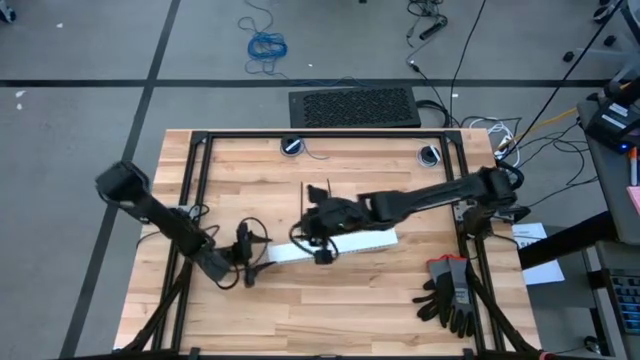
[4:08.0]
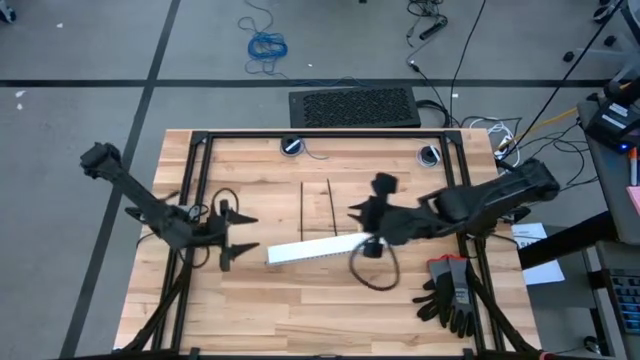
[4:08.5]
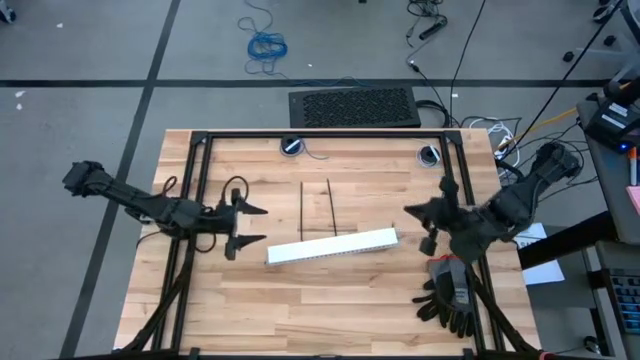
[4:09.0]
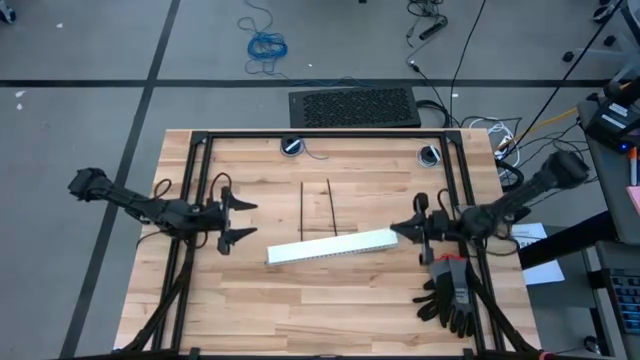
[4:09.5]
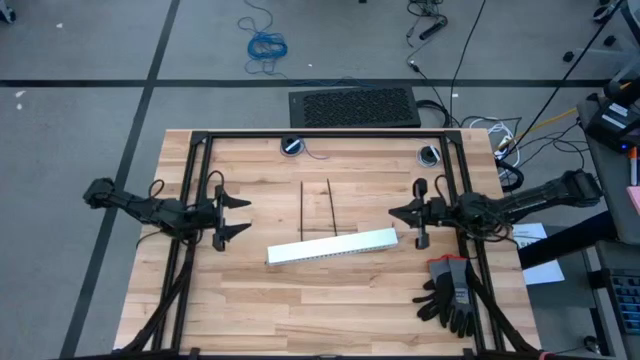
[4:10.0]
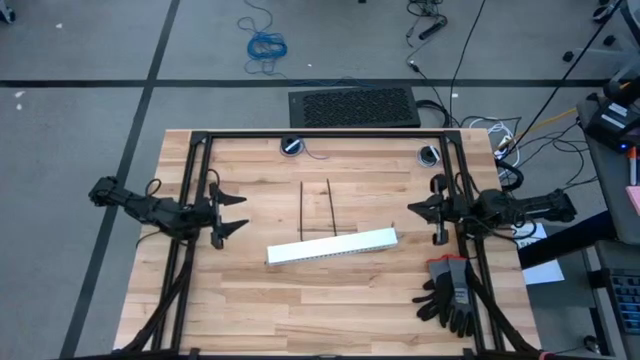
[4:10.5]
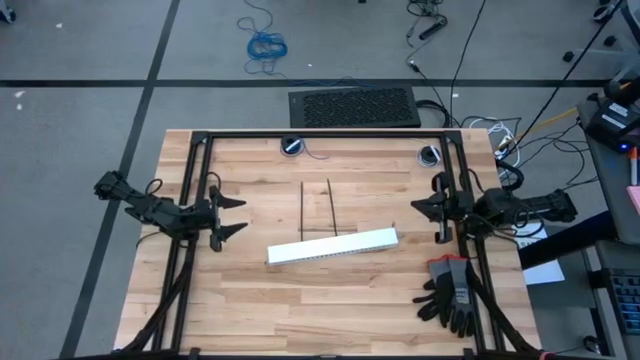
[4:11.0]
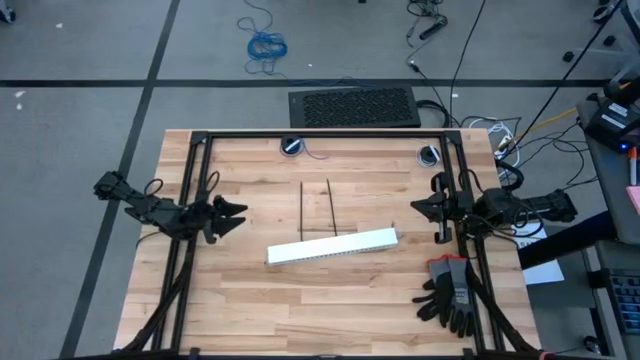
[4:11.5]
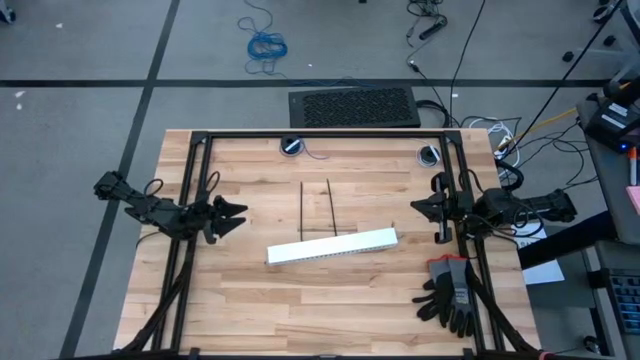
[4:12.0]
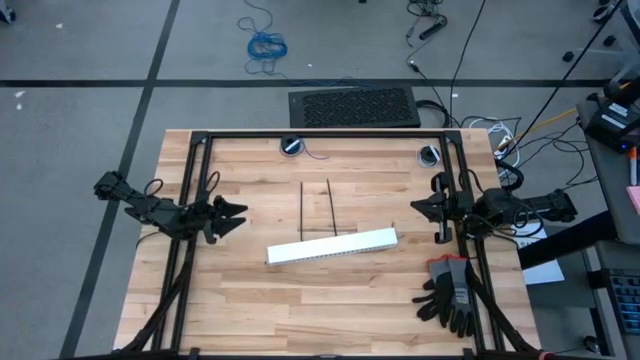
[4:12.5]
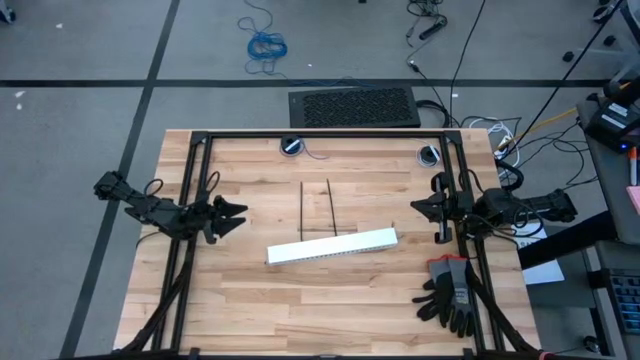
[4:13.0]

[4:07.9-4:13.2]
Task: Ziptie cables
Return to Home Position

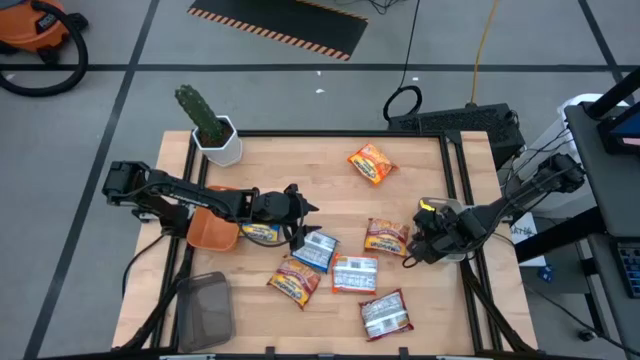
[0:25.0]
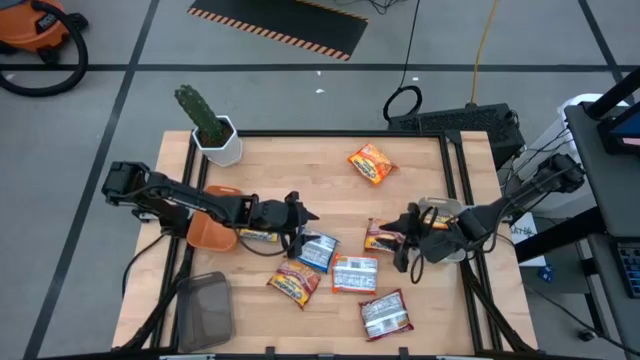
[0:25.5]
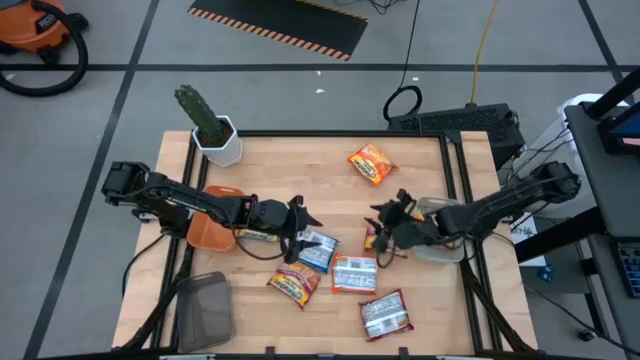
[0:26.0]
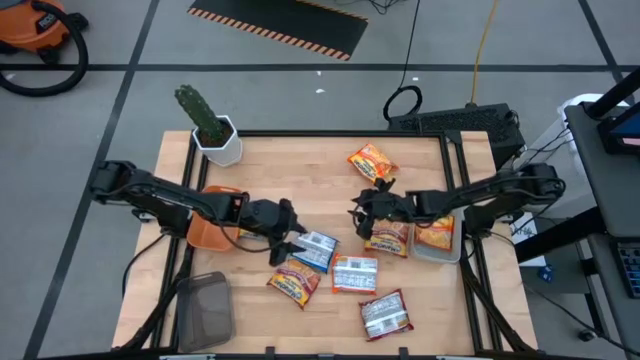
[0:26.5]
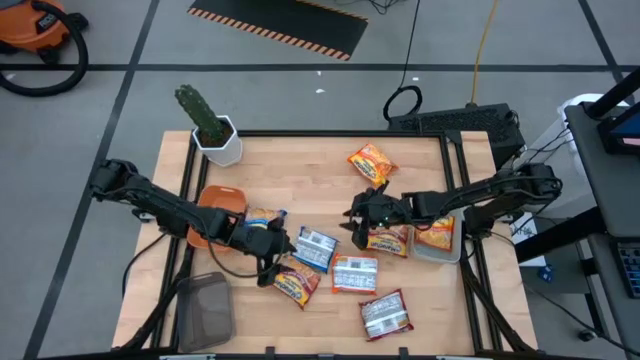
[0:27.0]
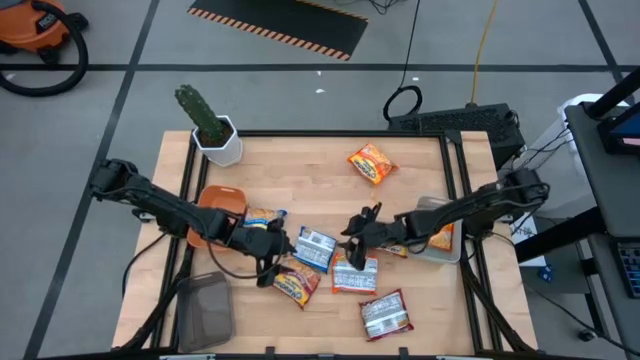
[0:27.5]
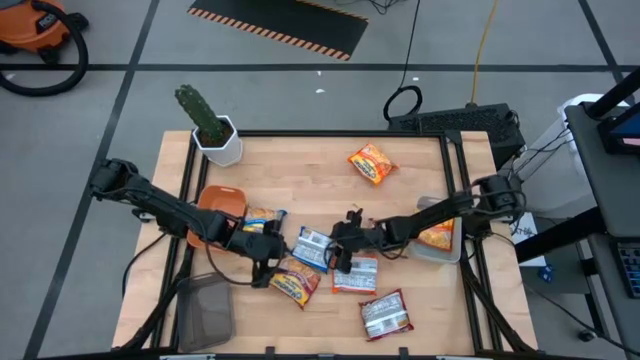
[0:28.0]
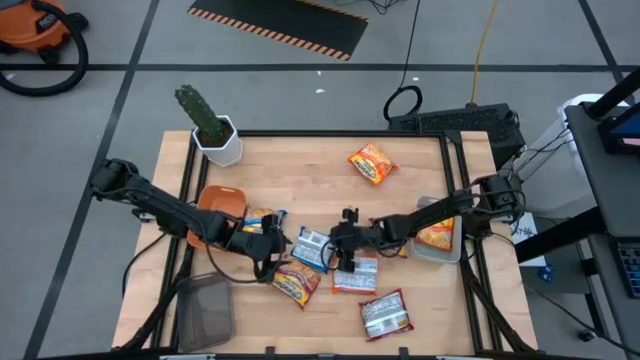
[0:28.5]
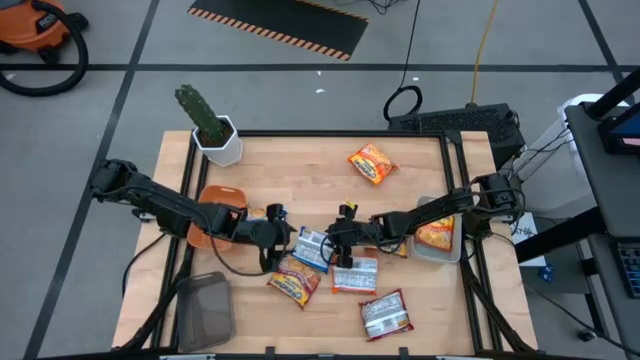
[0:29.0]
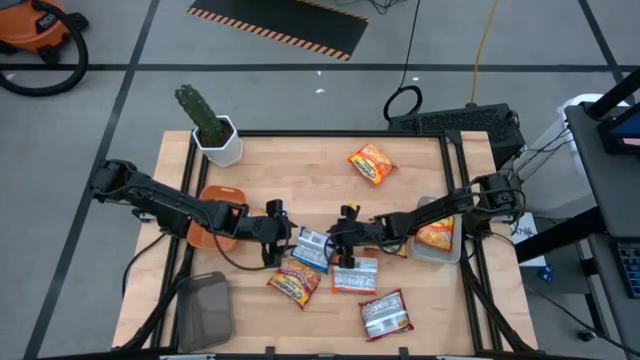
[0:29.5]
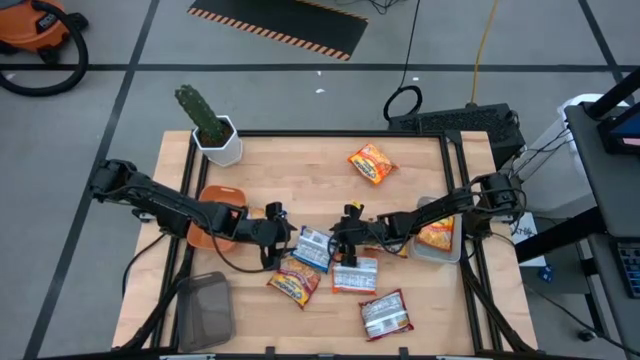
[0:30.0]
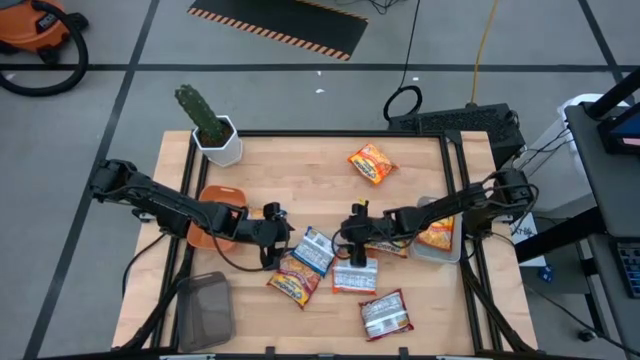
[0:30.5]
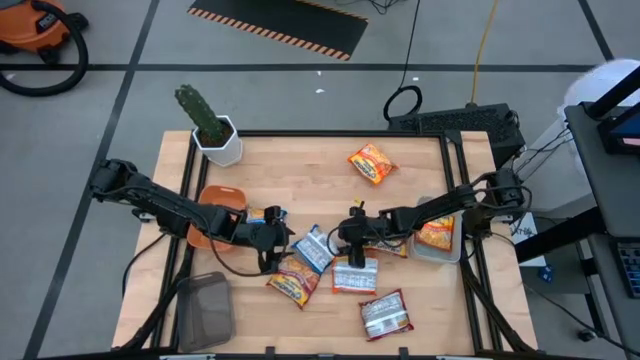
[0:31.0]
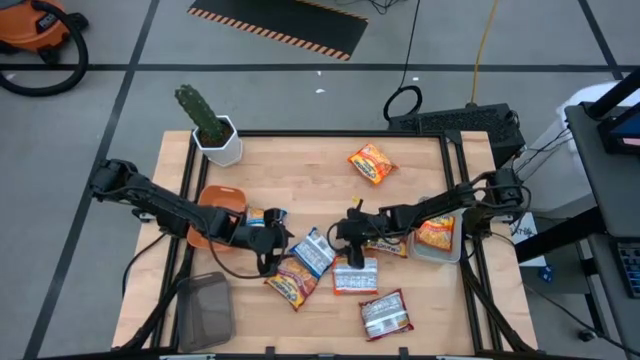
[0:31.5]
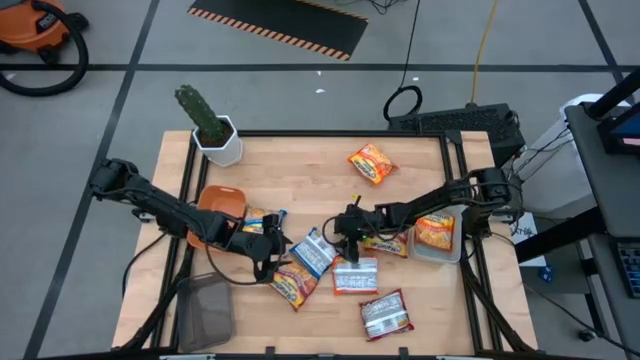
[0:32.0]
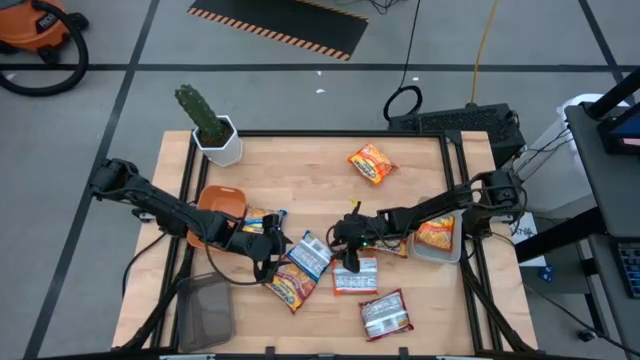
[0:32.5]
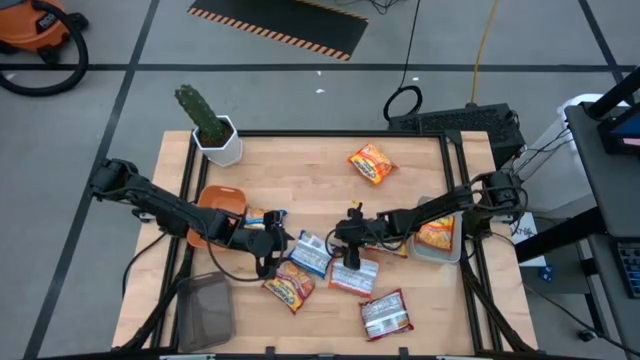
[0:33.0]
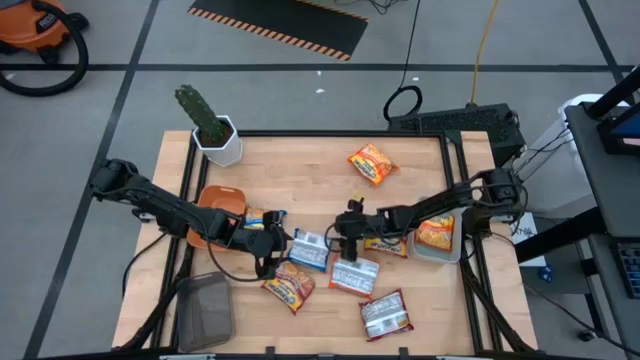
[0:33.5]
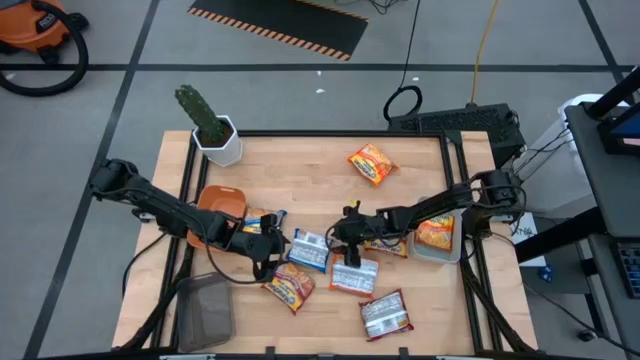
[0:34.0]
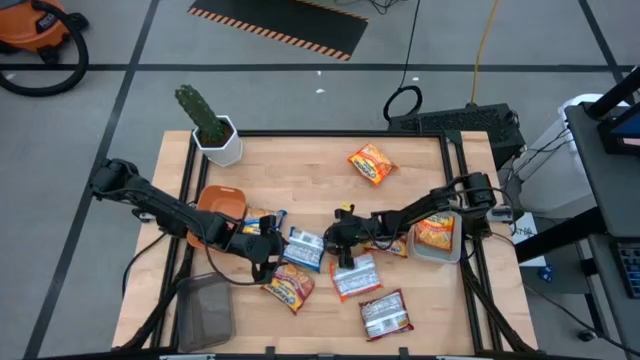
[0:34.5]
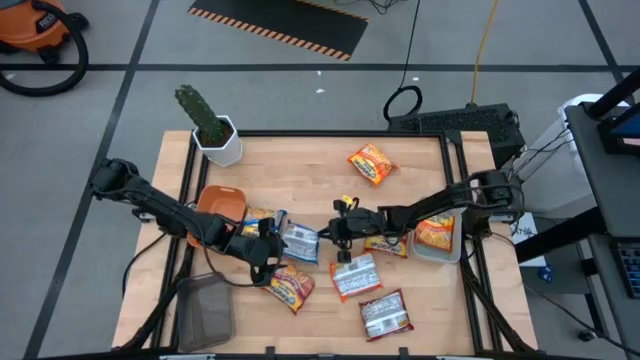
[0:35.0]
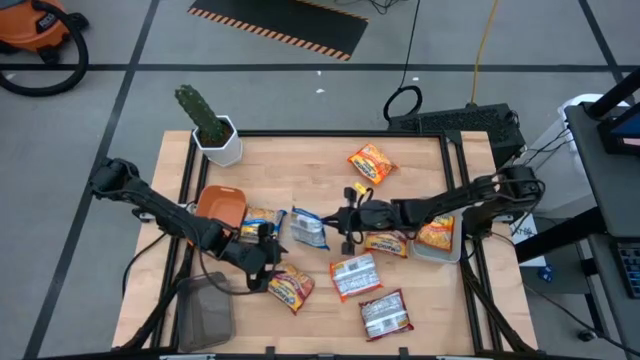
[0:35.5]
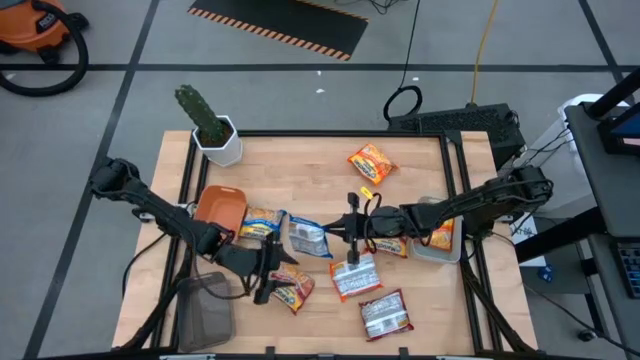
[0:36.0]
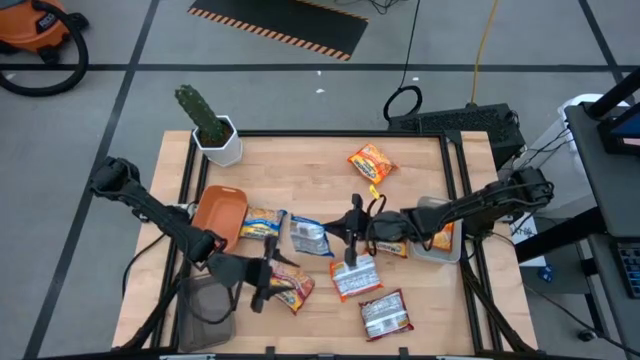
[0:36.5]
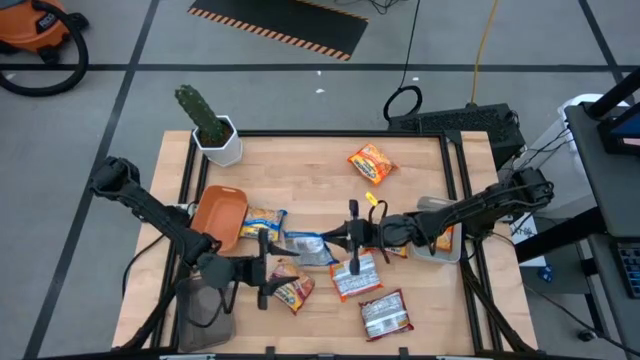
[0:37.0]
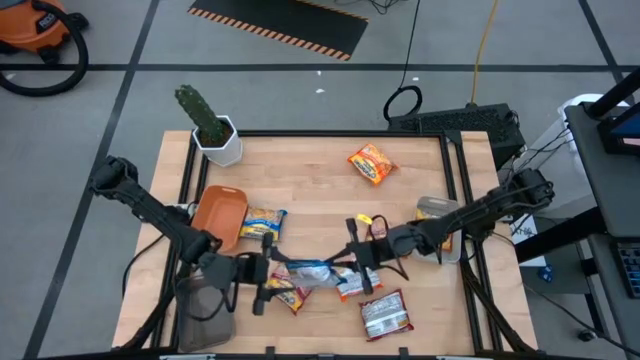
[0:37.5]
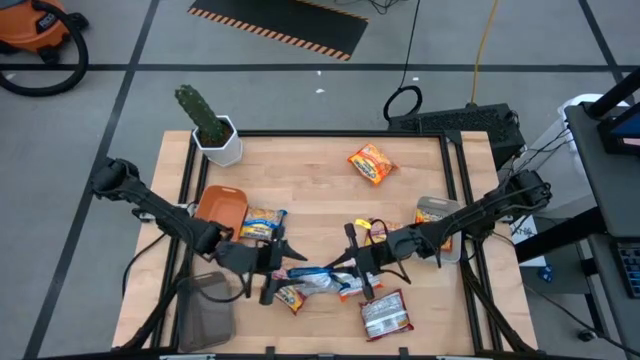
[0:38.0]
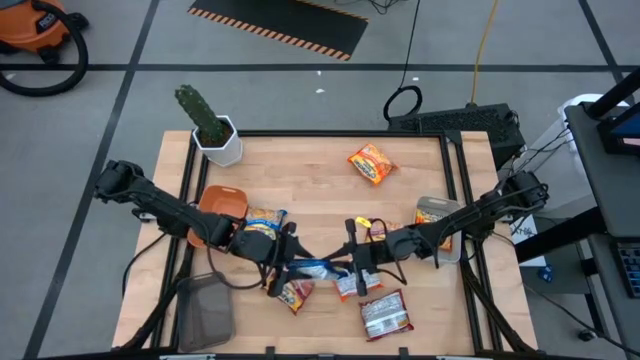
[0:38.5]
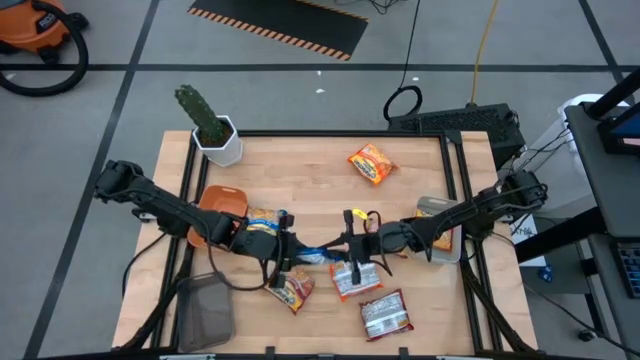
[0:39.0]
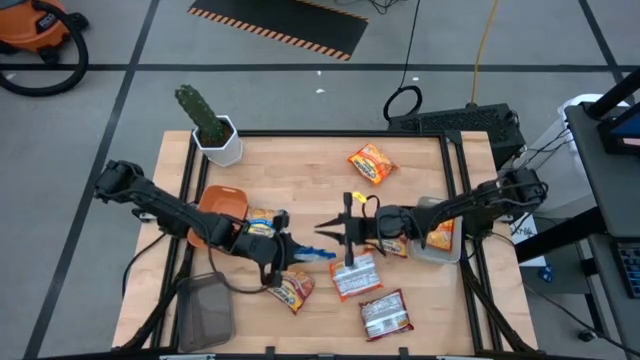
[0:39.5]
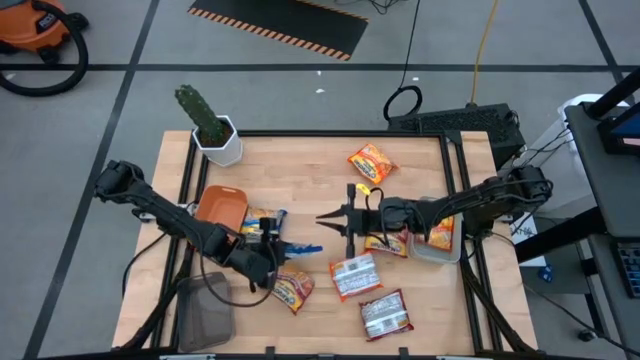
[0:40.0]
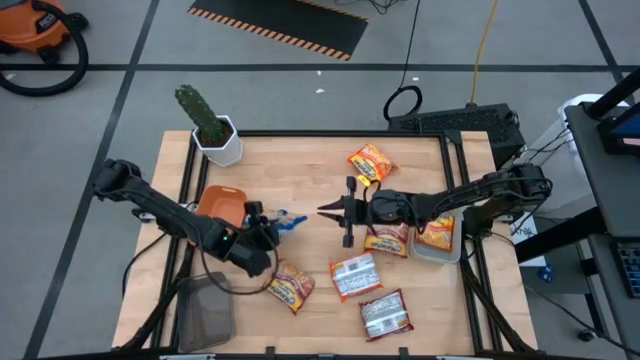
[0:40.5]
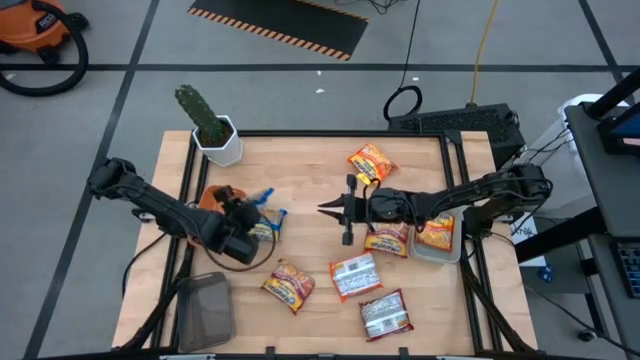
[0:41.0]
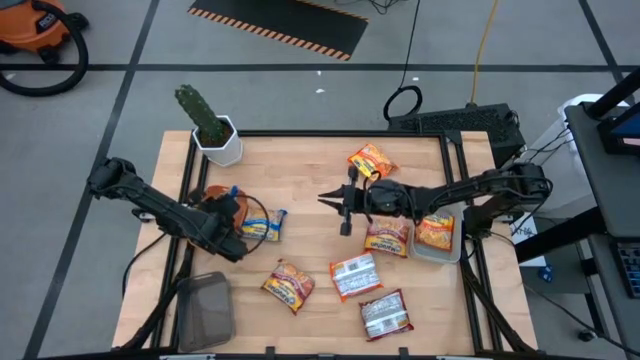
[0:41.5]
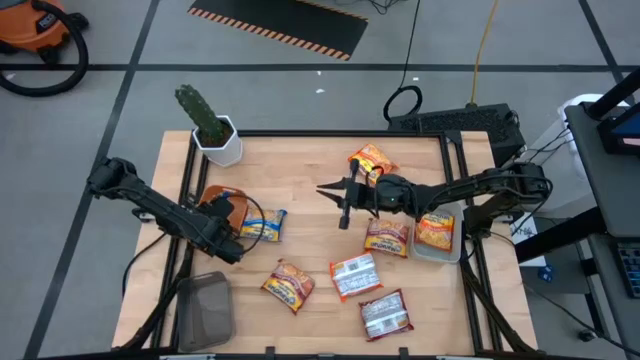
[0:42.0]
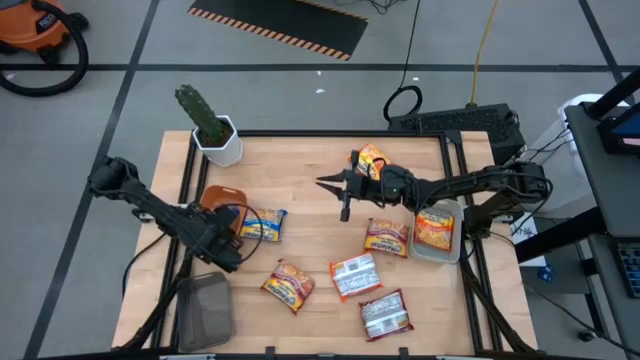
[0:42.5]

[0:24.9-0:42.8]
Task: Sort Maruchan noodles
Put the right blue noodle pack into the orange bin
